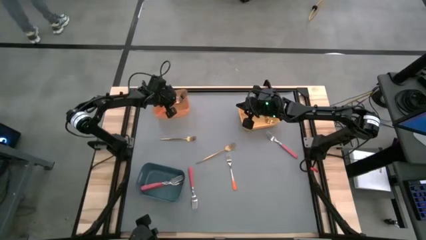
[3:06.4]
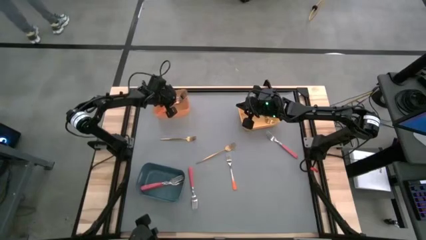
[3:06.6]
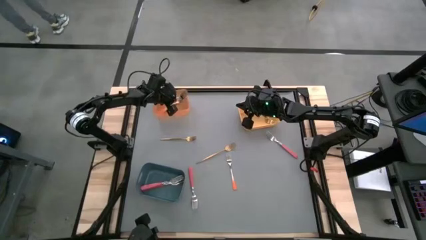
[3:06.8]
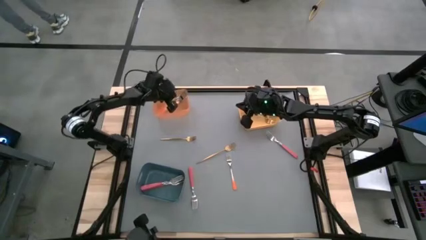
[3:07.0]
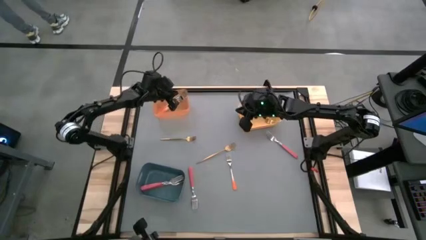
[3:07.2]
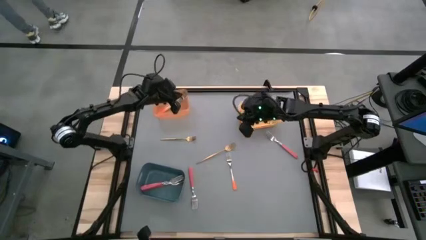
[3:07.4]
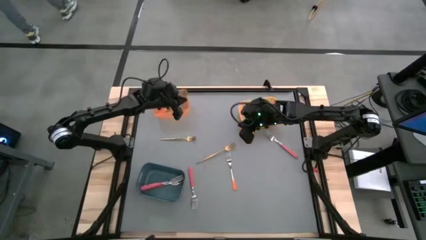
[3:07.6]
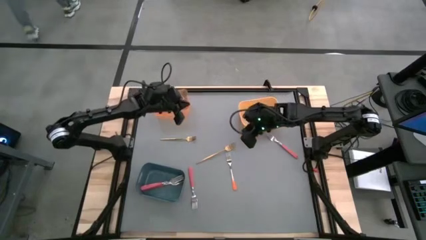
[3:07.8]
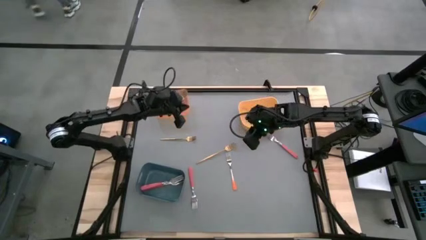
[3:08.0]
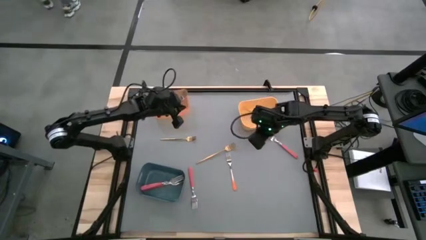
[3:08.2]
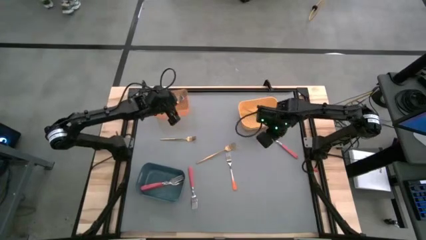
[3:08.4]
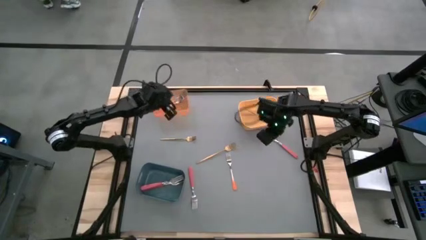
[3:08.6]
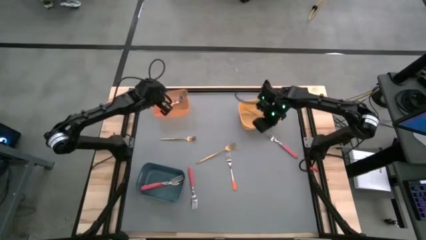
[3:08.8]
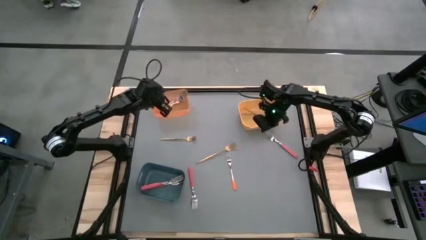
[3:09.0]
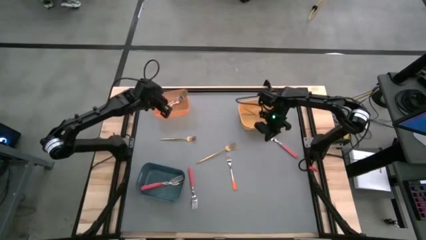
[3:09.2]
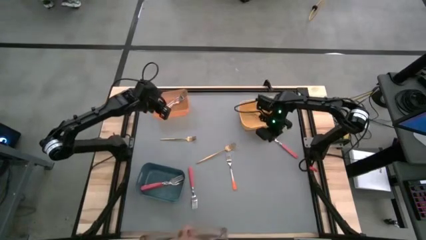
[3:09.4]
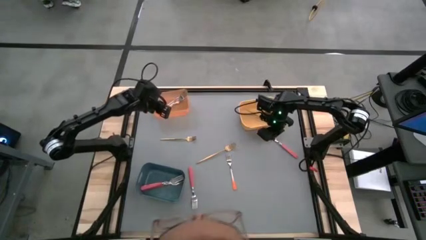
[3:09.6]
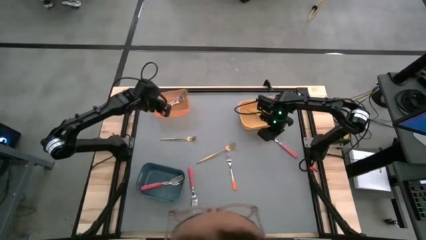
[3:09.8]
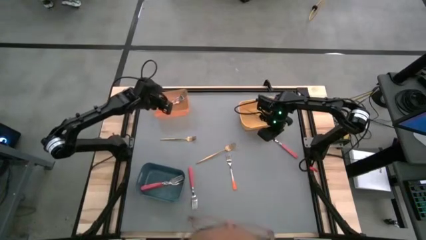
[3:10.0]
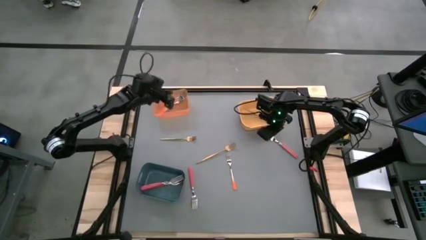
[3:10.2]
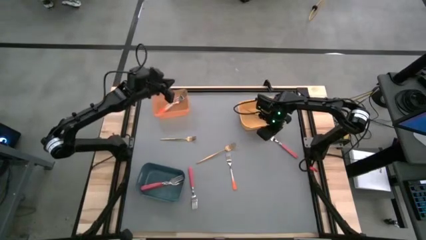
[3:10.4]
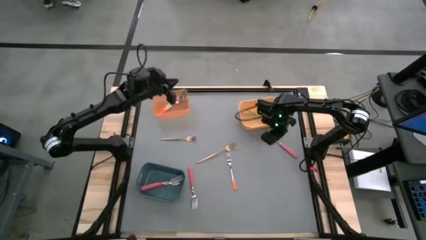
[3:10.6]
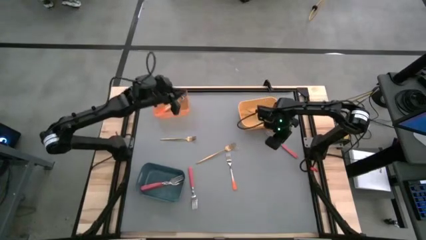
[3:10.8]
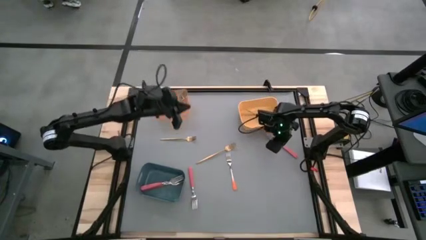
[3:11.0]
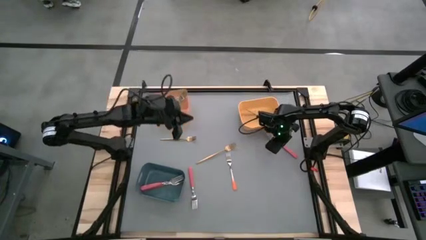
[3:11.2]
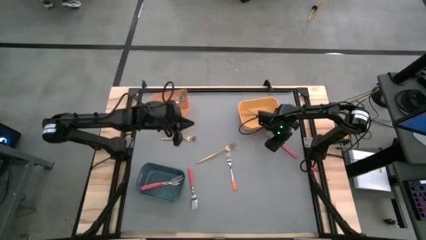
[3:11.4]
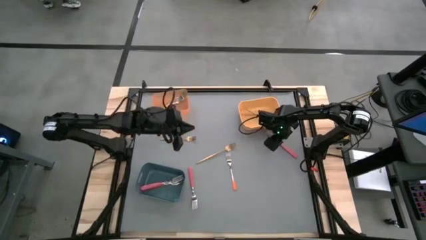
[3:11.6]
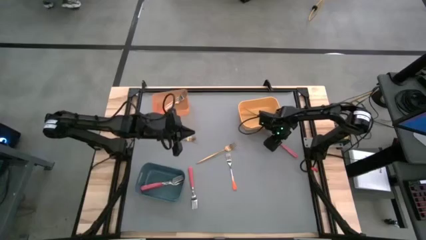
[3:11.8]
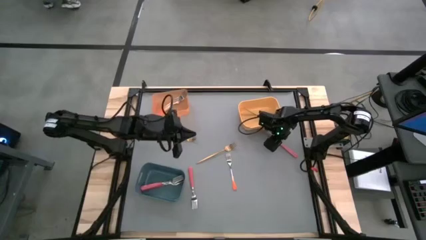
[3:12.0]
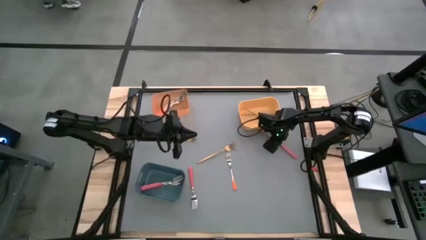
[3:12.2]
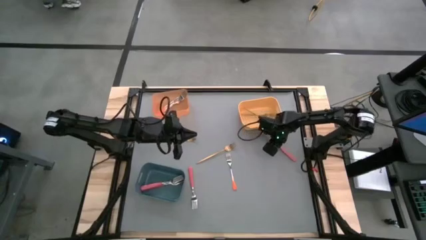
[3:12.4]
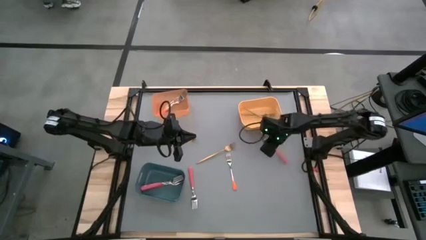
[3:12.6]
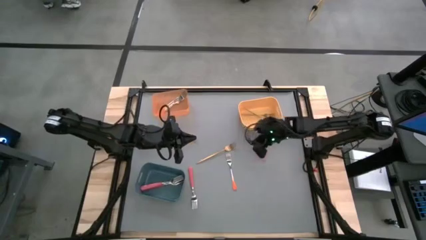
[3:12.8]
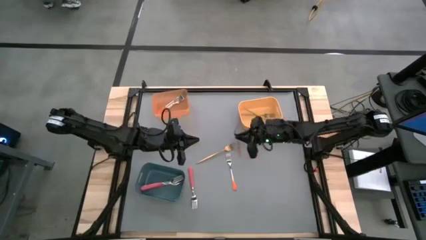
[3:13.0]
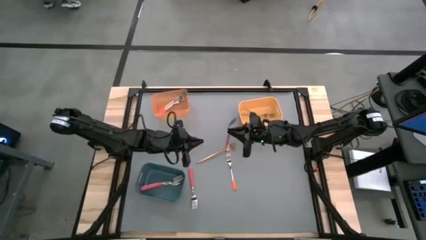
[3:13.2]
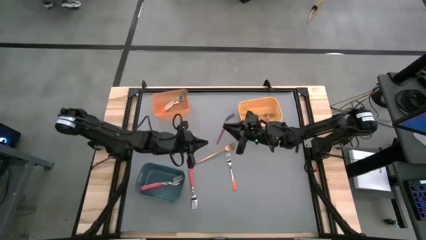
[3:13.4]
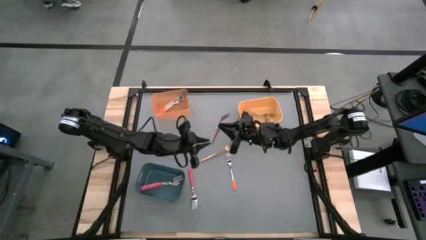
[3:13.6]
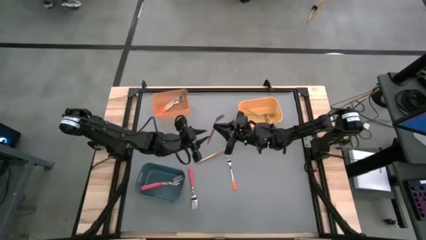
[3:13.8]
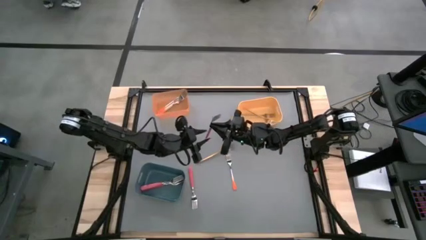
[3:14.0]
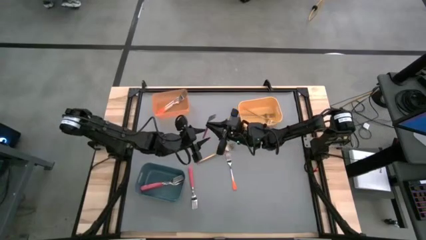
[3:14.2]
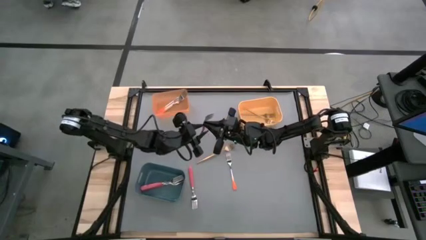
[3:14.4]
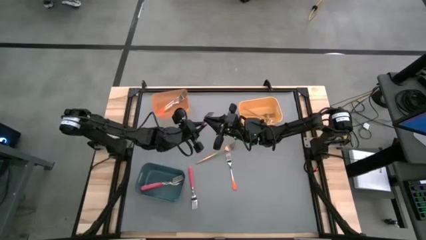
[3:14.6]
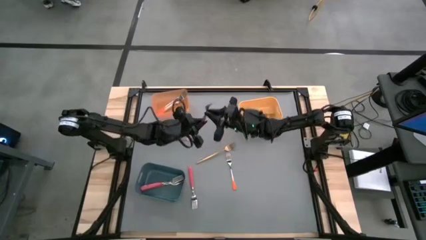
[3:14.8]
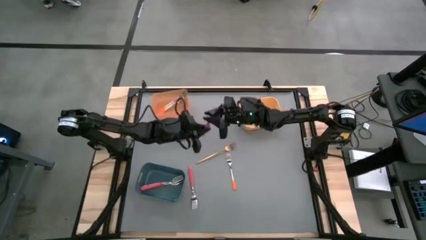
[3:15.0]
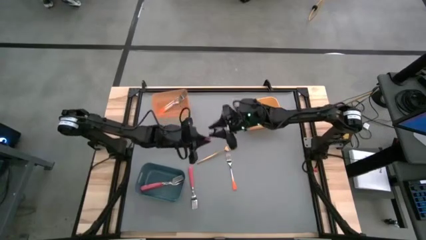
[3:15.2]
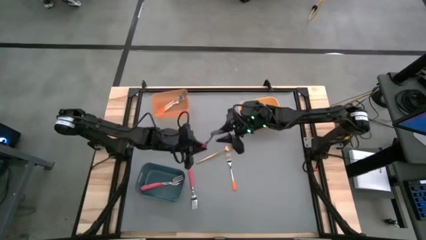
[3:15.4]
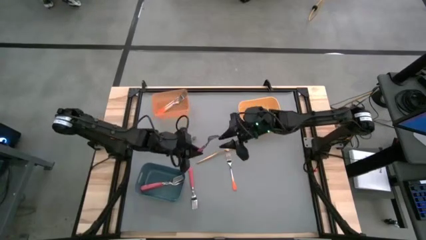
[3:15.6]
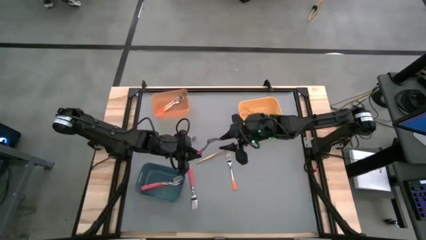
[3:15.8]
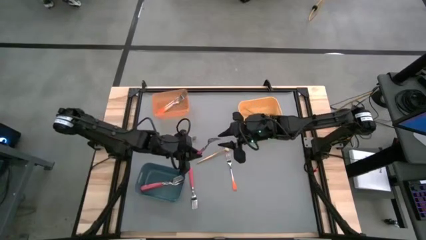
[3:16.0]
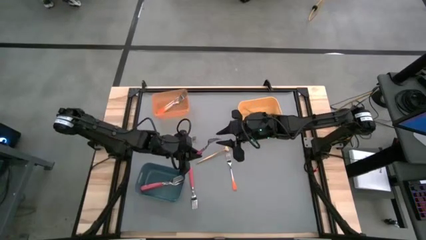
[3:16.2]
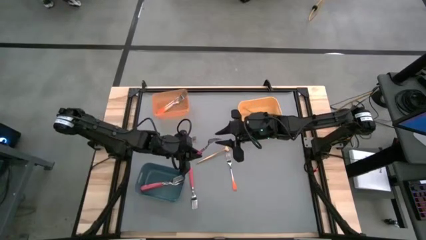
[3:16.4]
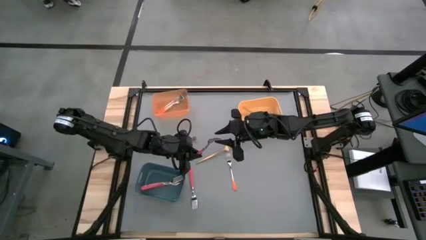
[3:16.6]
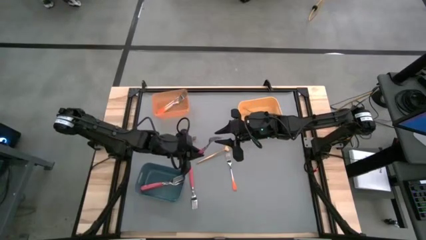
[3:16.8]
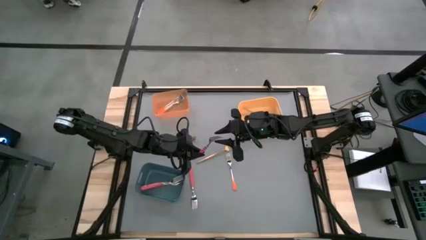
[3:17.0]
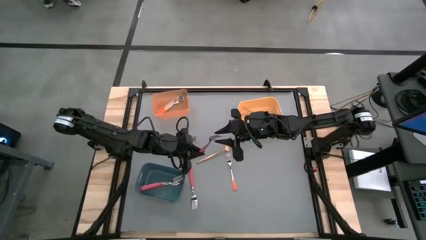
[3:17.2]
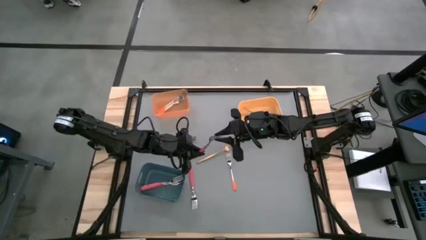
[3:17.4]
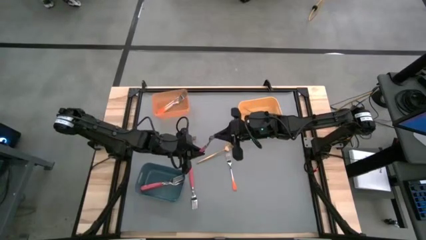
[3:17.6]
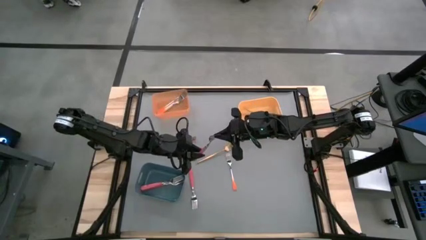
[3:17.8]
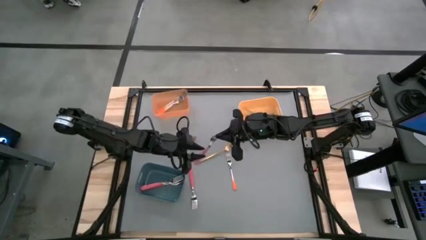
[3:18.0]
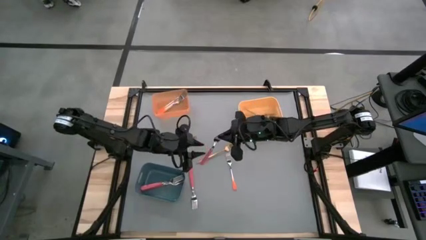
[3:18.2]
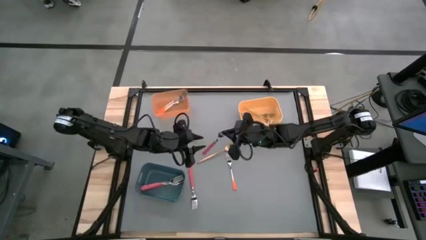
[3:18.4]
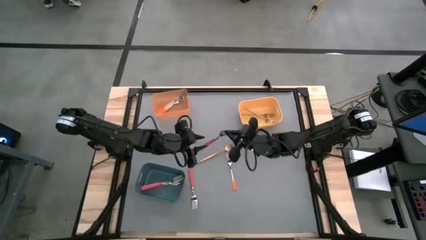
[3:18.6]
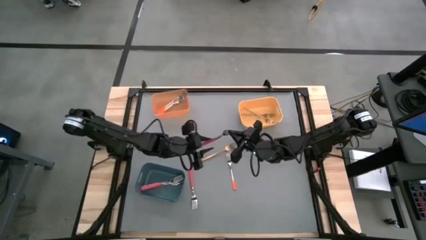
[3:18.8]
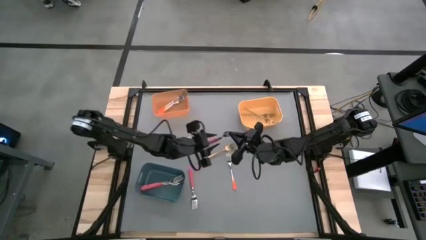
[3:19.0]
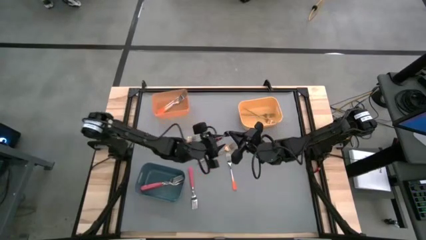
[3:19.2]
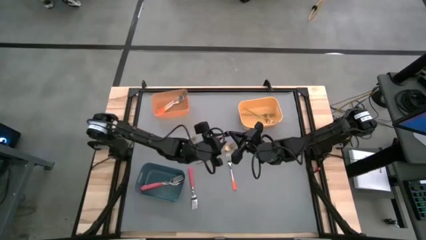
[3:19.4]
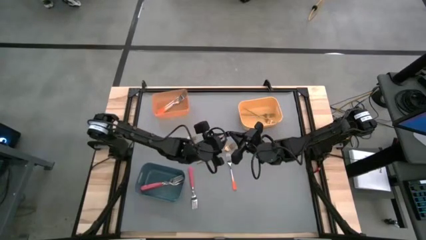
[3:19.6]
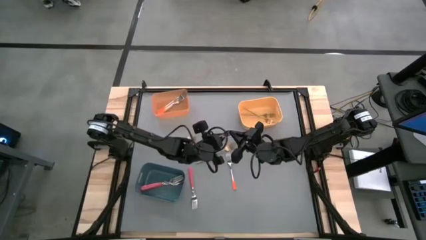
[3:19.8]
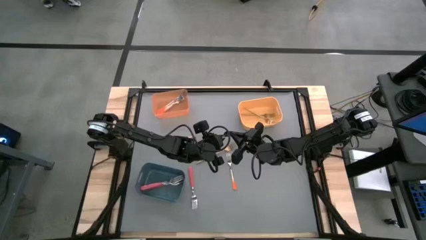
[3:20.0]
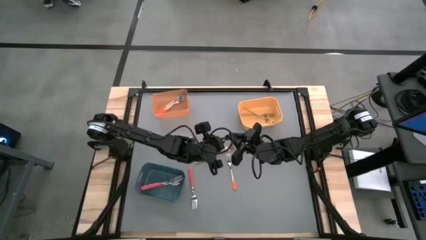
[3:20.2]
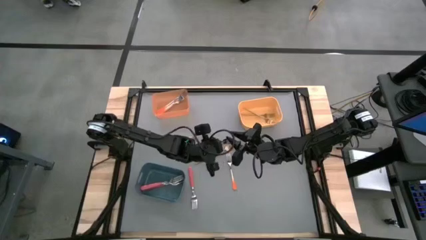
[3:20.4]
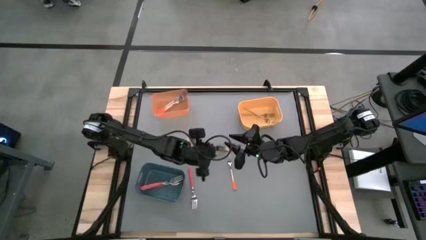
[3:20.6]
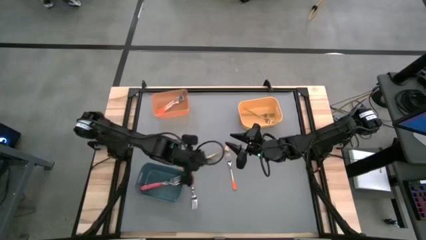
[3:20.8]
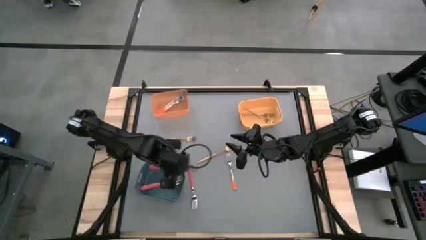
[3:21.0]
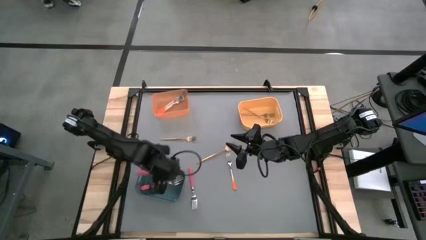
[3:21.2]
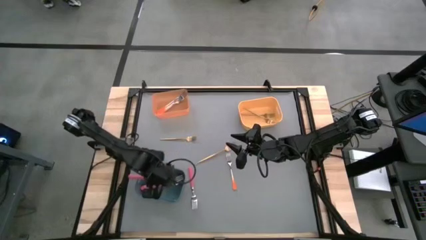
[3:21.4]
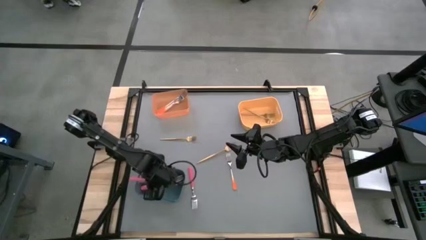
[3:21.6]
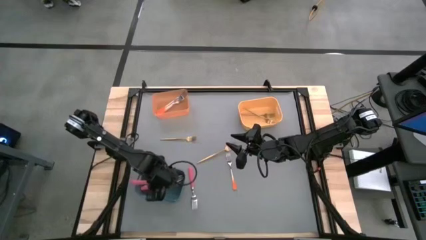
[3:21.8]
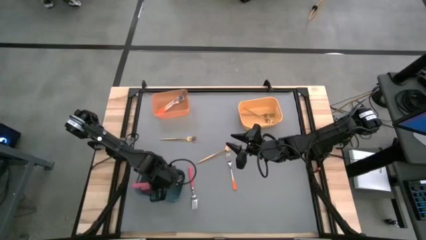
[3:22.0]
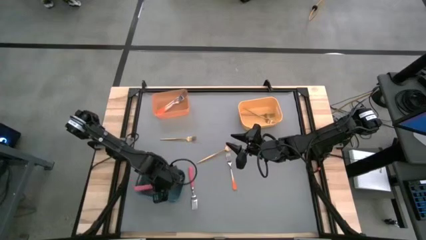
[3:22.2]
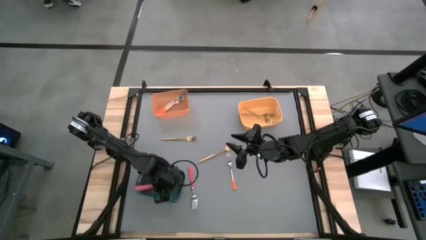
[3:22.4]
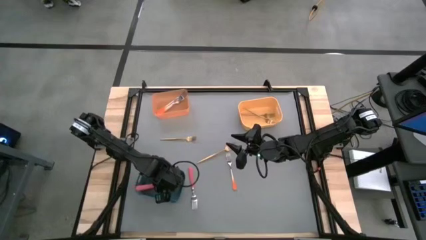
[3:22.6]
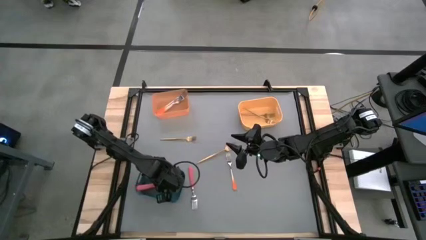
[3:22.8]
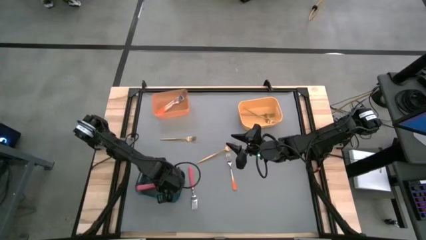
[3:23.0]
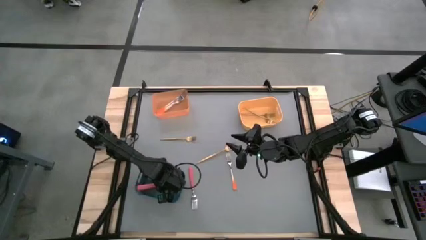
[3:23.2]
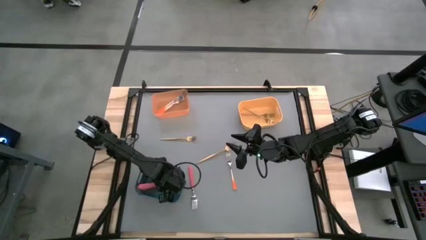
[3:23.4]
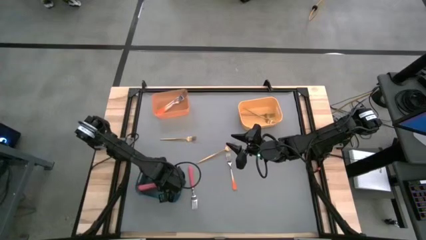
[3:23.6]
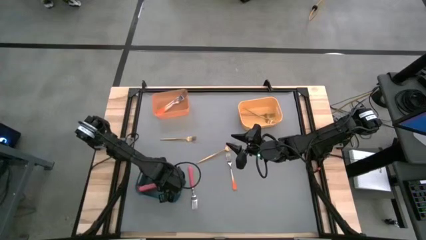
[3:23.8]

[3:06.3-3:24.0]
Task: Sort silverware by color (type)
Put the pink fork into the blue bin
